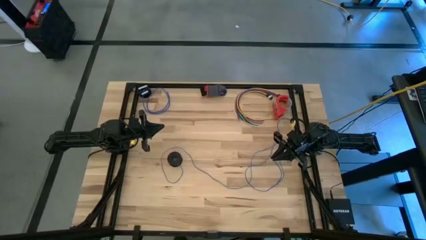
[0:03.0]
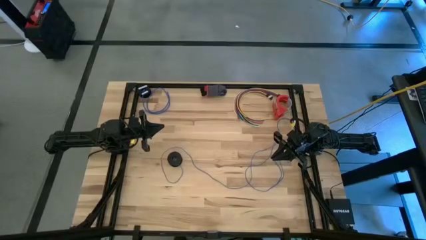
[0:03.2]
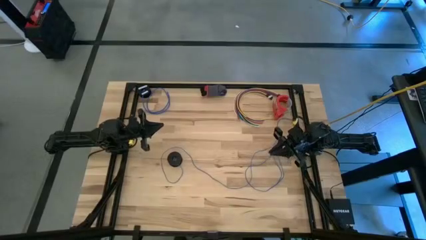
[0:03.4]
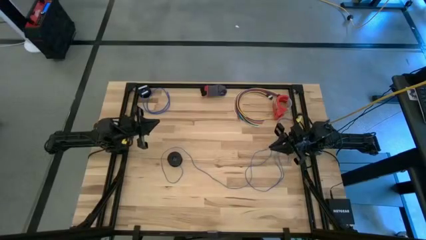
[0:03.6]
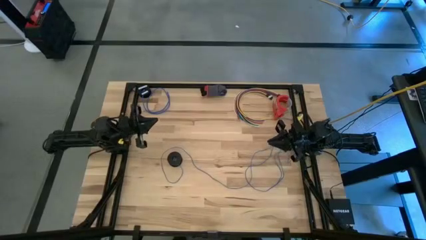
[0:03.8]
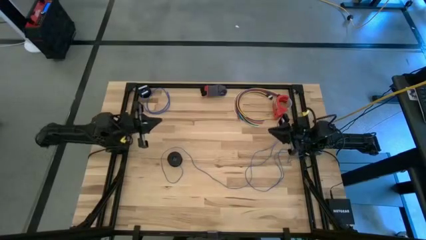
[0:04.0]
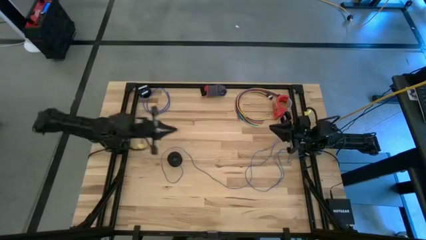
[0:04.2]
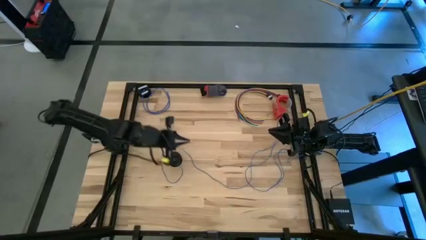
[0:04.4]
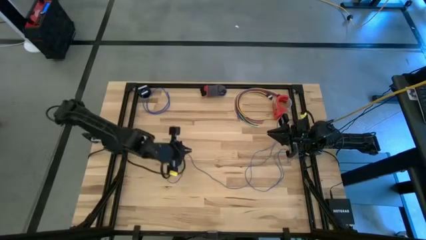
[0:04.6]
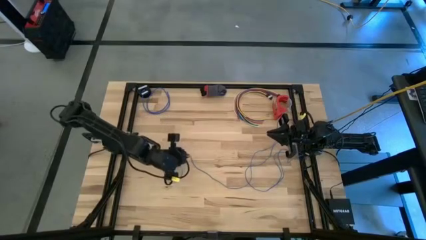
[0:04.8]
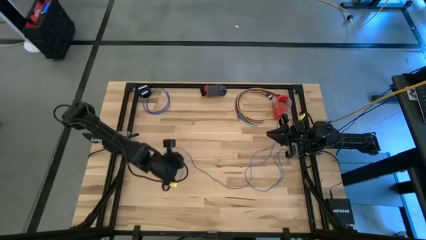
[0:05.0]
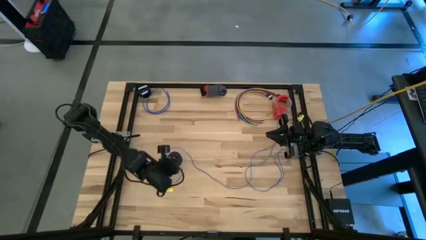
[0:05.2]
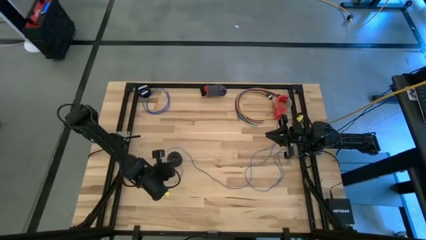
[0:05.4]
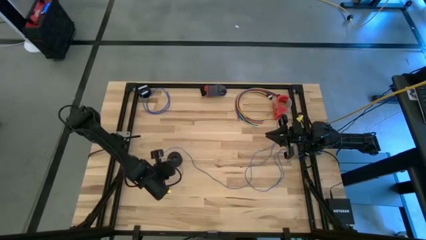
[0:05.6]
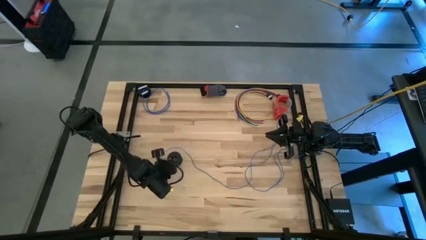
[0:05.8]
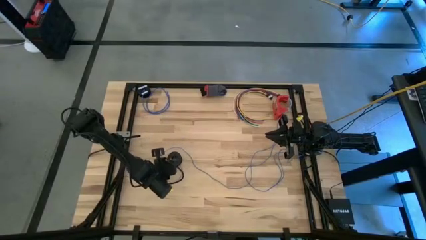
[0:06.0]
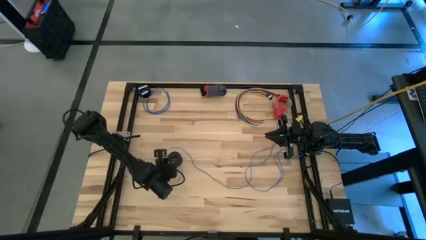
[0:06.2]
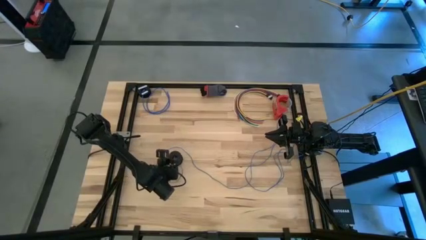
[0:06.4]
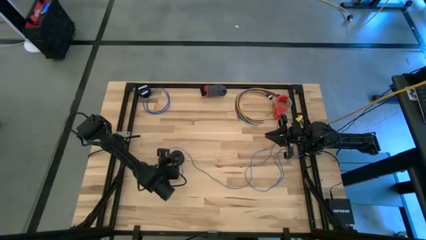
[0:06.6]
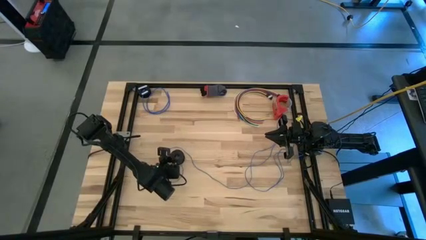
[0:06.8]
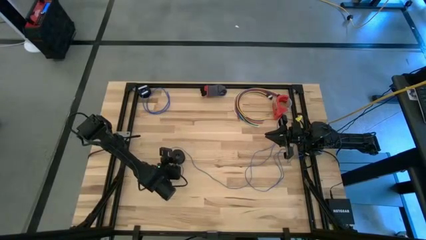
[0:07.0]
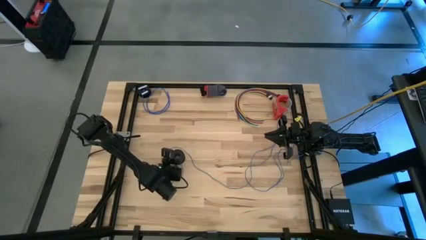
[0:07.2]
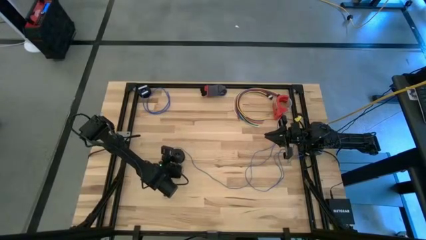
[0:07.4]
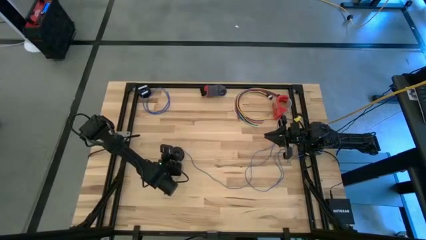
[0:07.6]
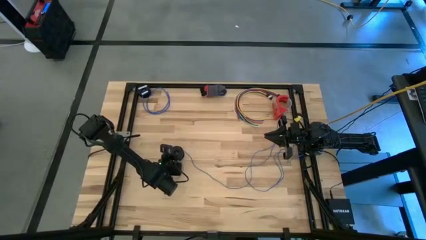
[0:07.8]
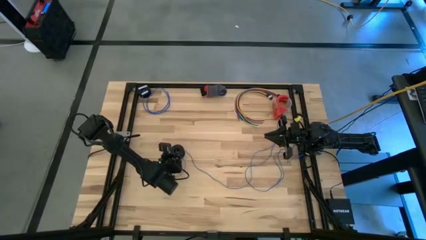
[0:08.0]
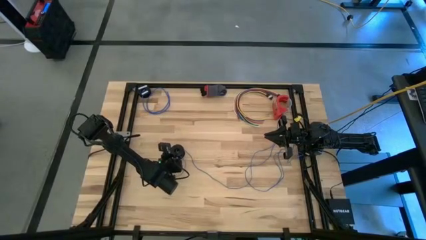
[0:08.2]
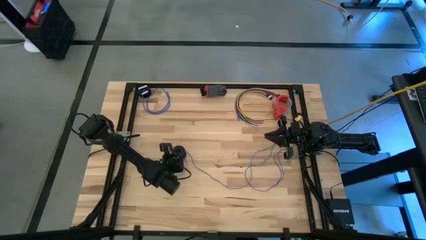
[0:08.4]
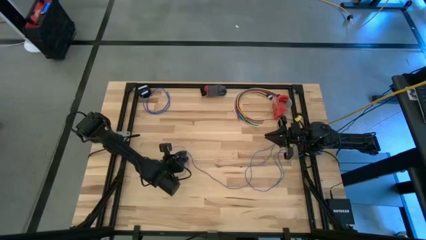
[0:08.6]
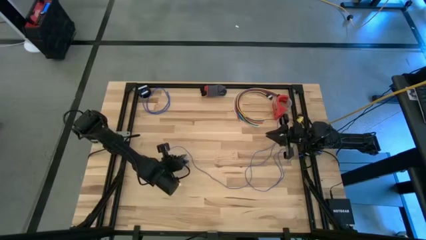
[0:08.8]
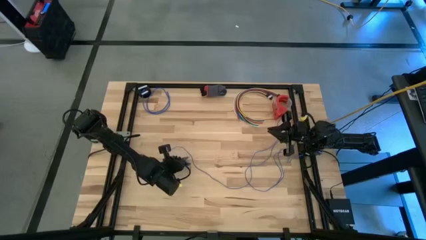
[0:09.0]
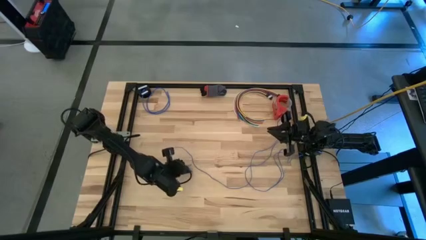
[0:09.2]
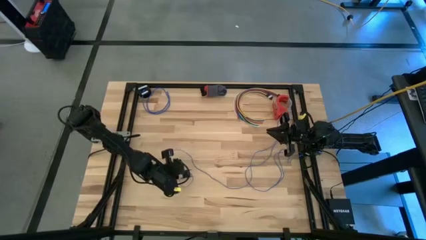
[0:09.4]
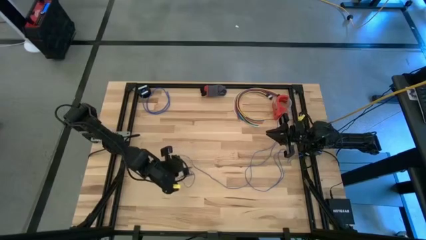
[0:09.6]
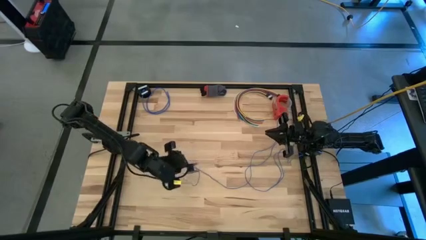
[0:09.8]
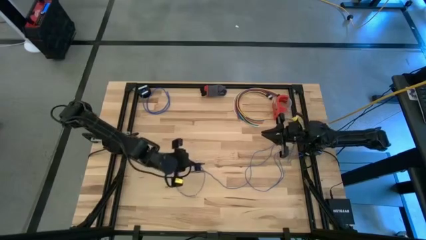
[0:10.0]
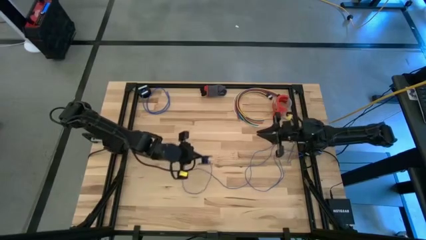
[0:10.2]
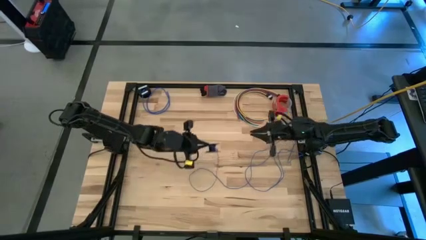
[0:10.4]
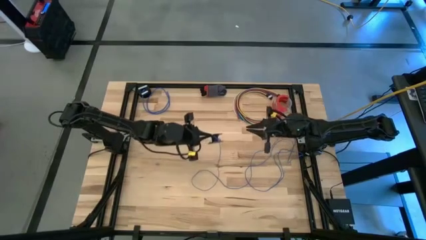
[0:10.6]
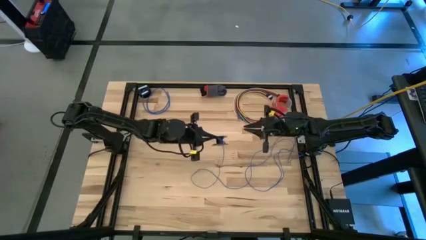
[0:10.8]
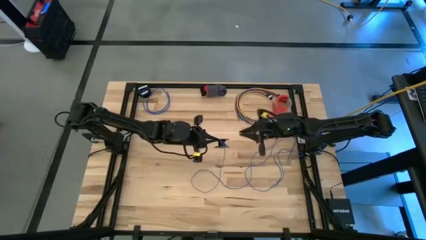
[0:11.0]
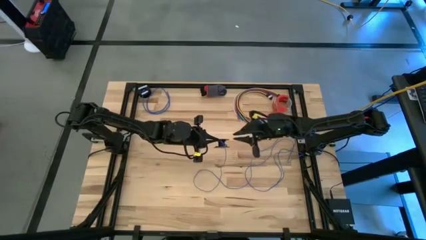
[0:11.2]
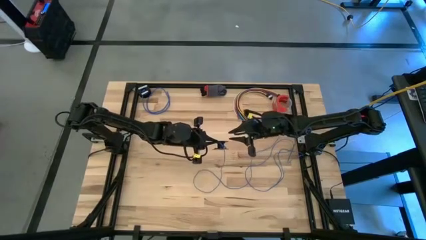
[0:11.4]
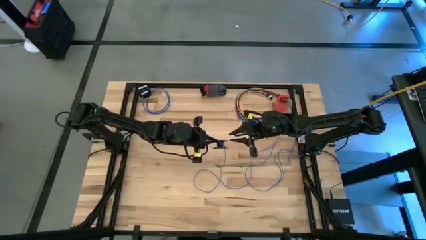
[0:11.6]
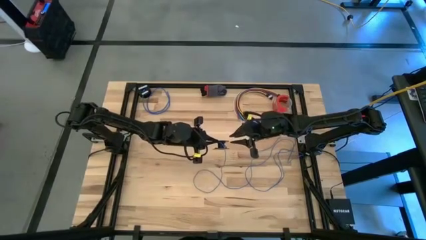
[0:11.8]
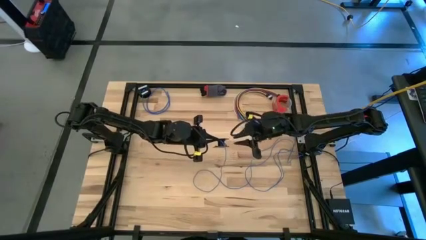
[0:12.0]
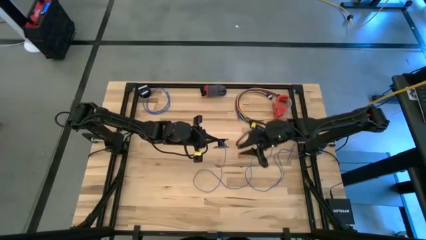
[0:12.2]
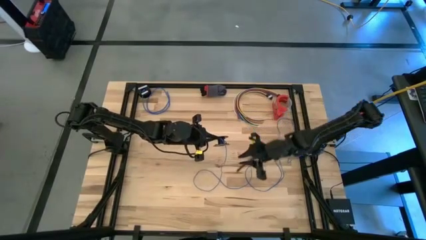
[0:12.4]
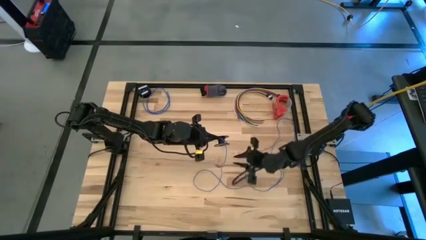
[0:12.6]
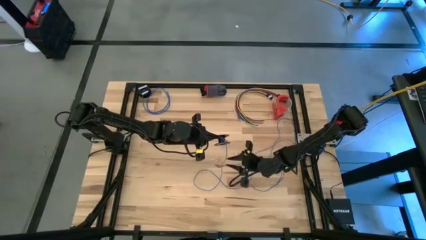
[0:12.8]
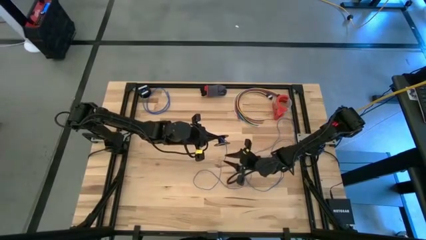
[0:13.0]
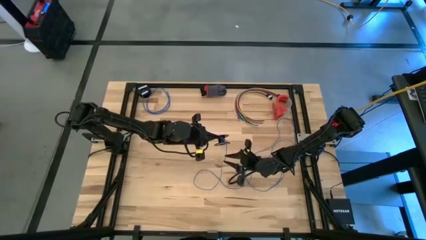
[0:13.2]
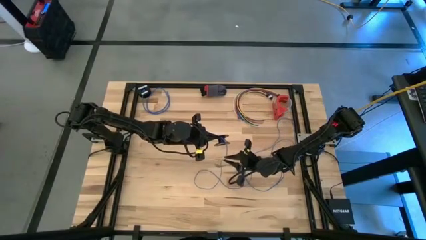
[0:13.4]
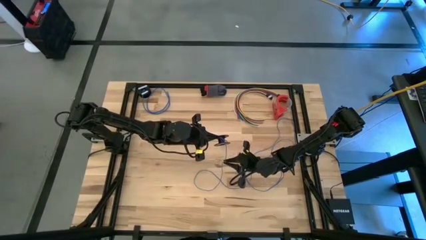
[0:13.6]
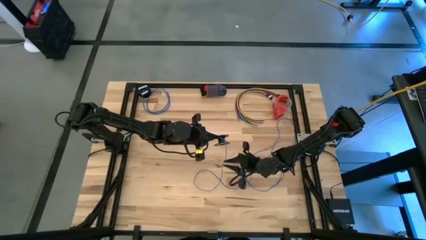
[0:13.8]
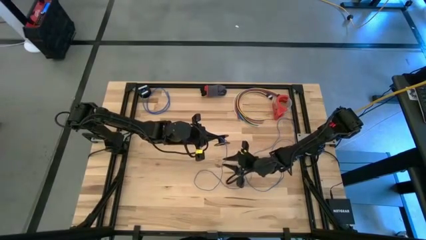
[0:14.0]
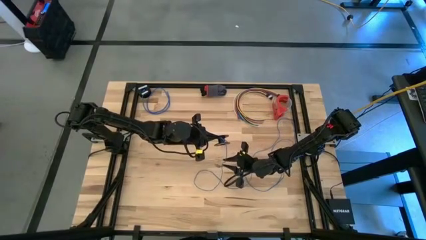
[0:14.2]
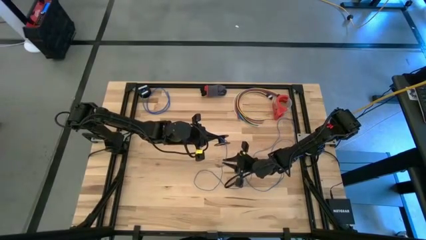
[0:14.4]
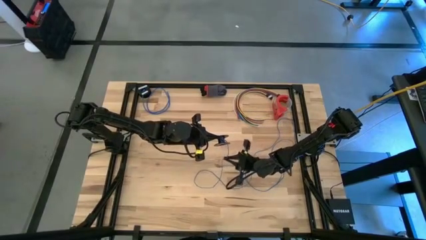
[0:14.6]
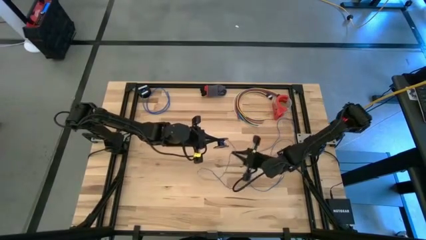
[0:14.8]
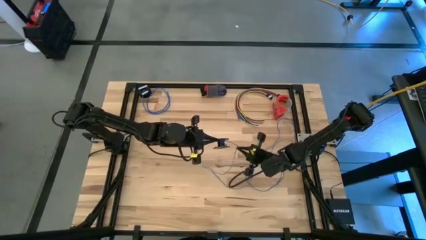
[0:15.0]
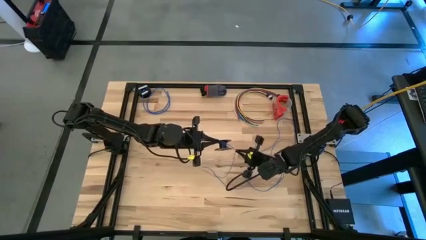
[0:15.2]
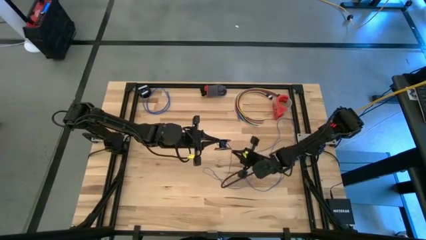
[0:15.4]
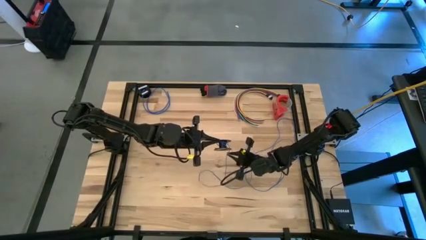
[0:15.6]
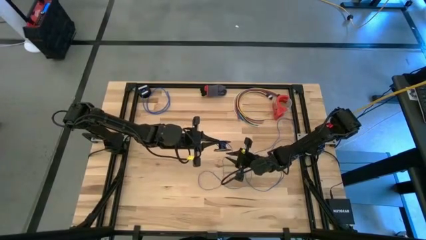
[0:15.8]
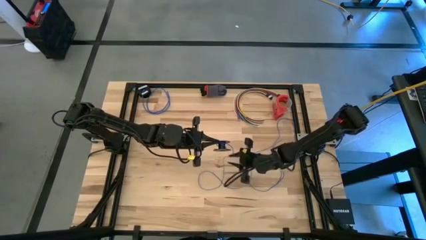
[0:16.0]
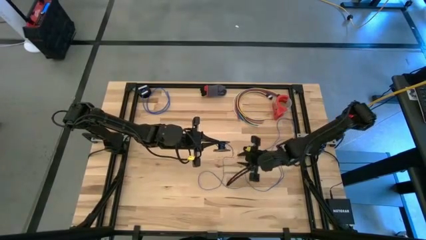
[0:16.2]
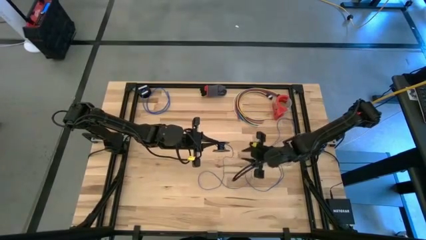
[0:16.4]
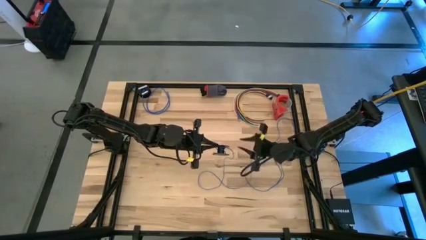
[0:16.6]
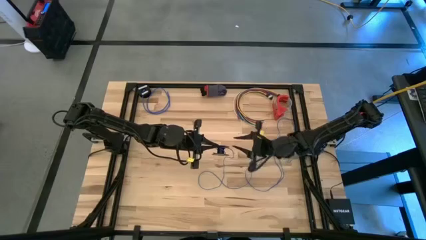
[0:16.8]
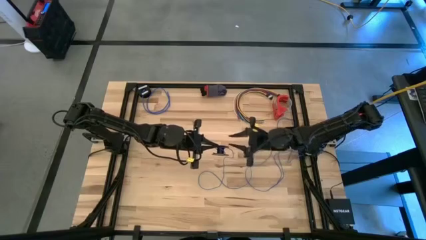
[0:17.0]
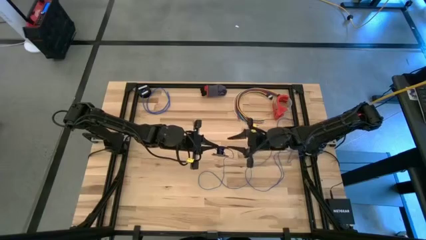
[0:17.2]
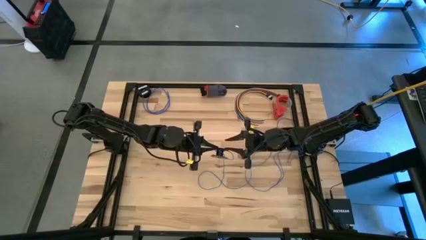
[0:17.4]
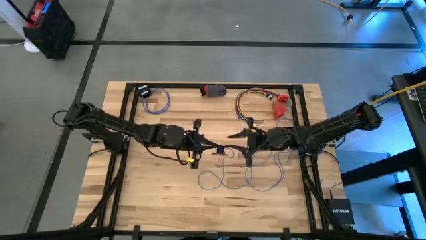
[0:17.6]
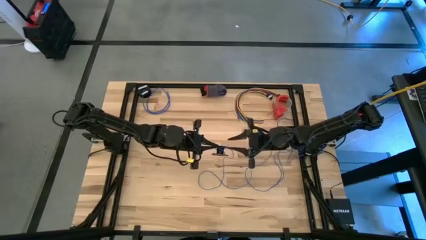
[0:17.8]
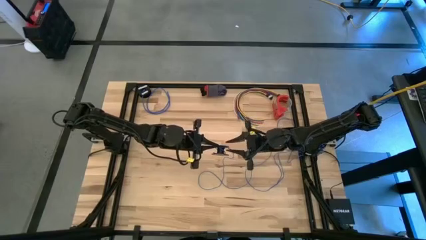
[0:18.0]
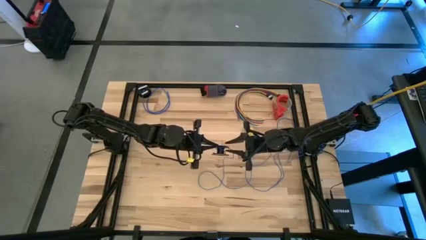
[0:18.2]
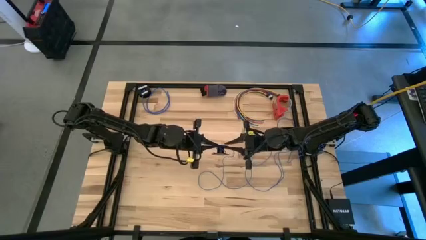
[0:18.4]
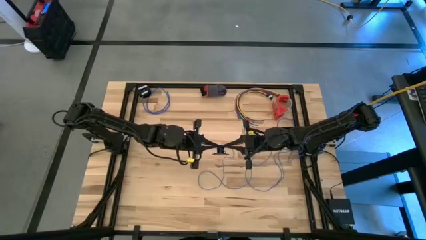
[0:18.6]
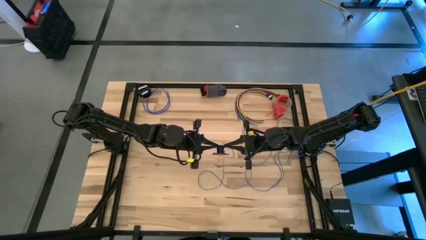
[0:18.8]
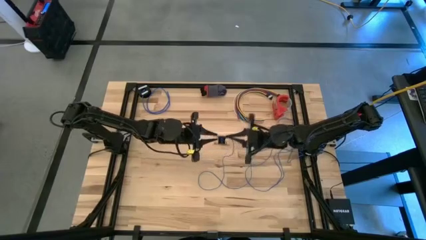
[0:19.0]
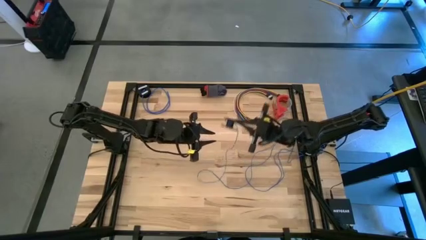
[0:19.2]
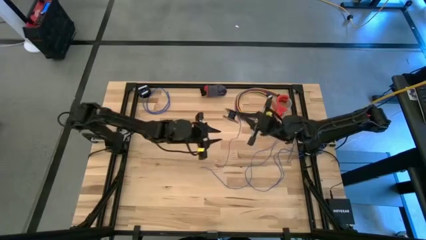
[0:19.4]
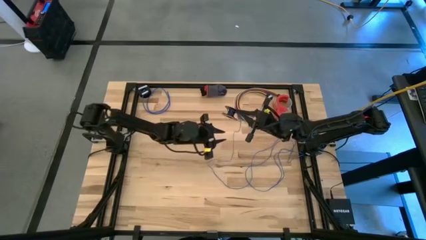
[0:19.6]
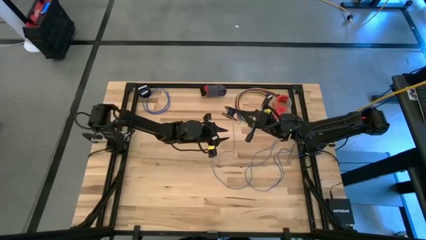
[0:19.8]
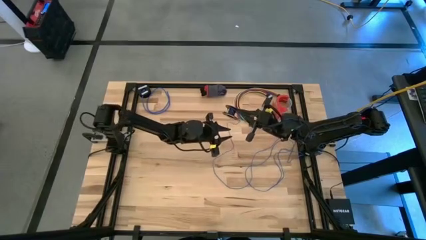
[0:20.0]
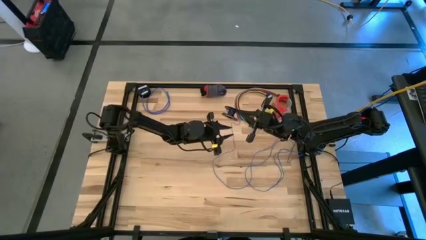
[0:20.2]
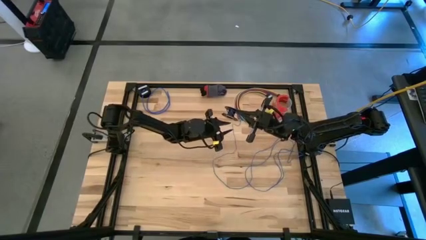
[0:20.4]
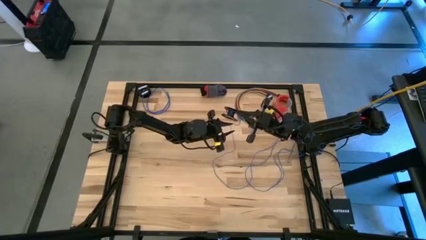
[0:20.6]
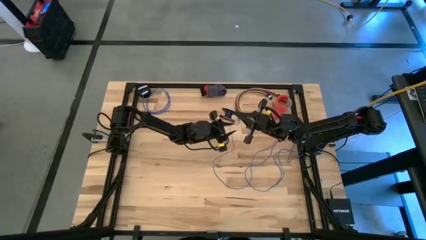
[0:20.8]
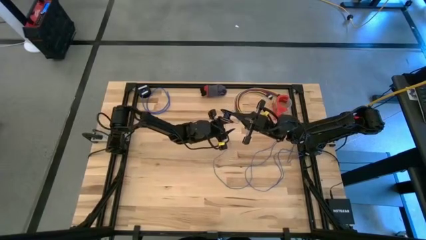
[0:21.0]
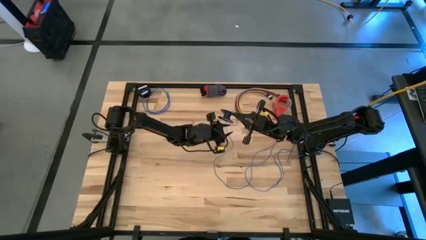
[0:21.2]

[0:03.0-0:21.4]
Task: Coil cords
Coil the blue wire on the black spool
